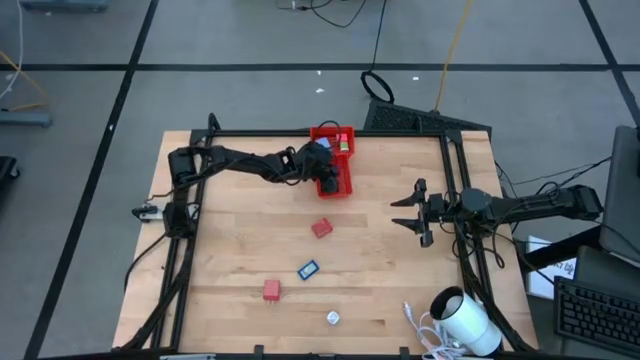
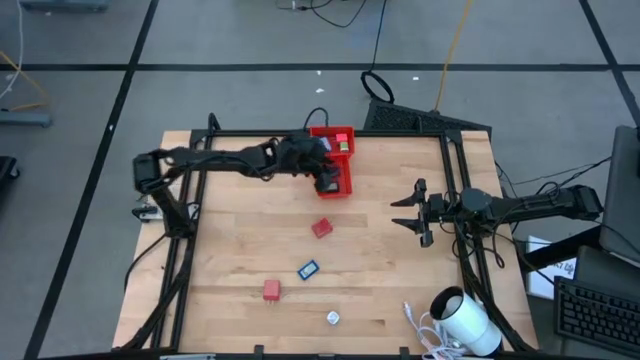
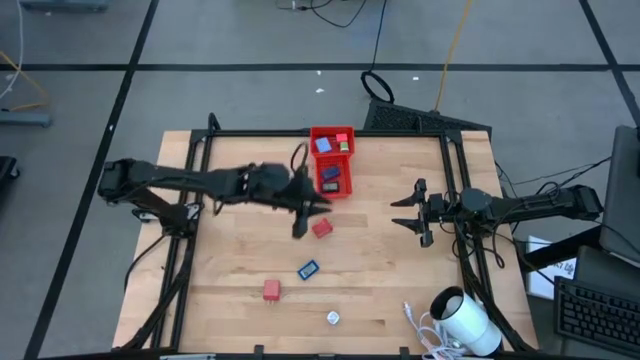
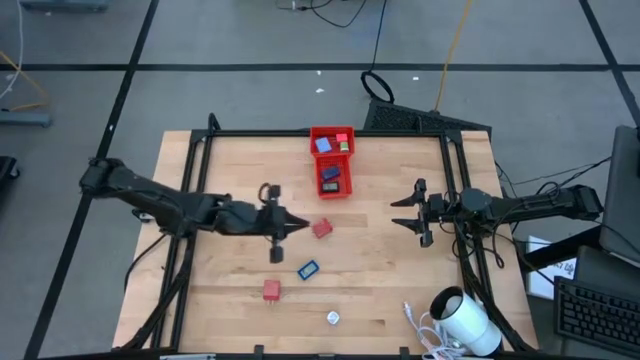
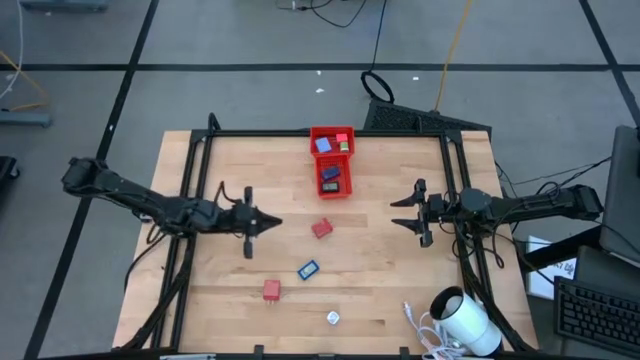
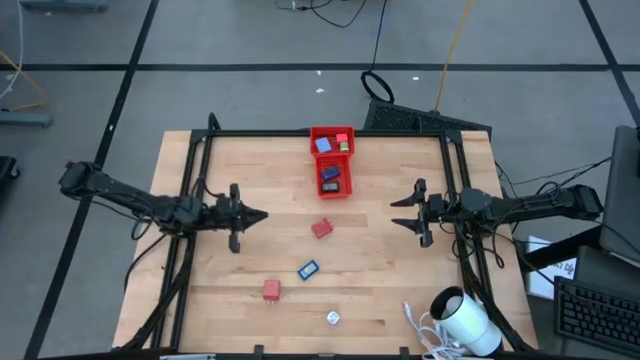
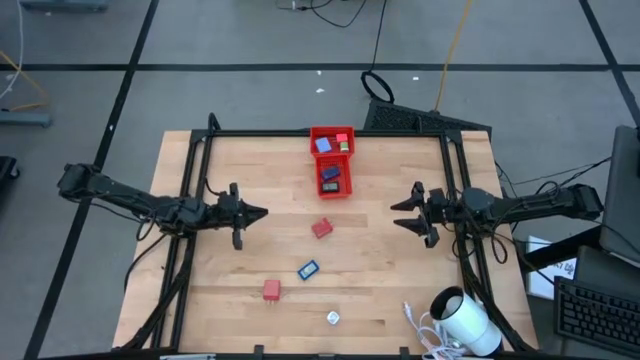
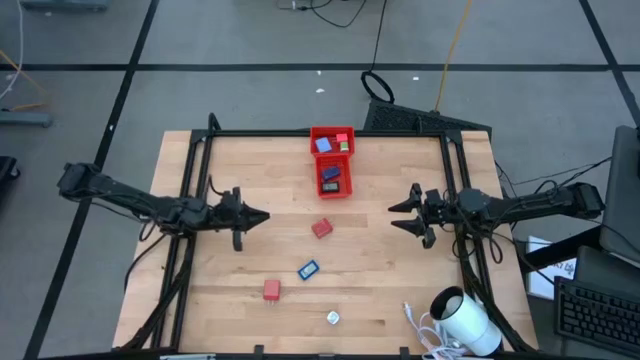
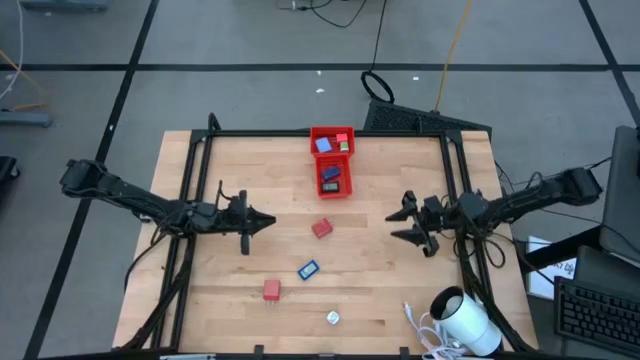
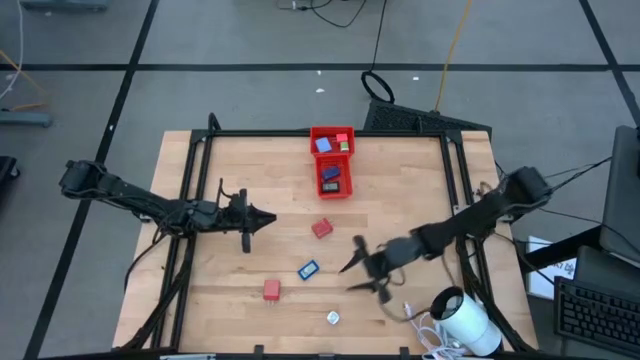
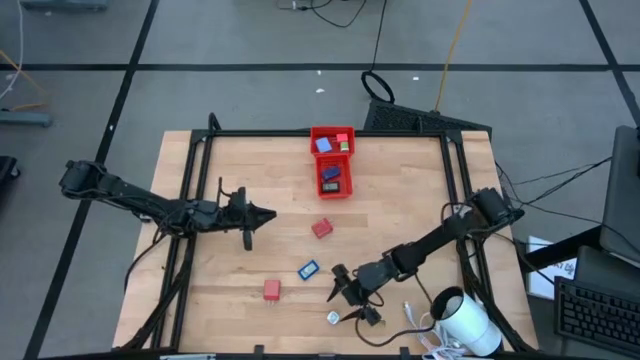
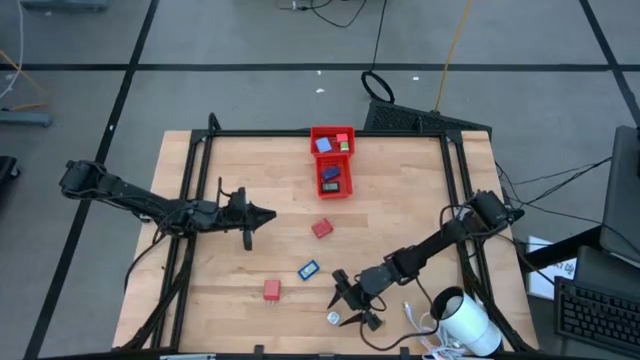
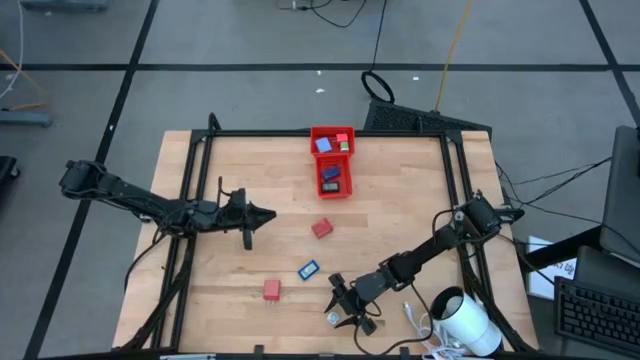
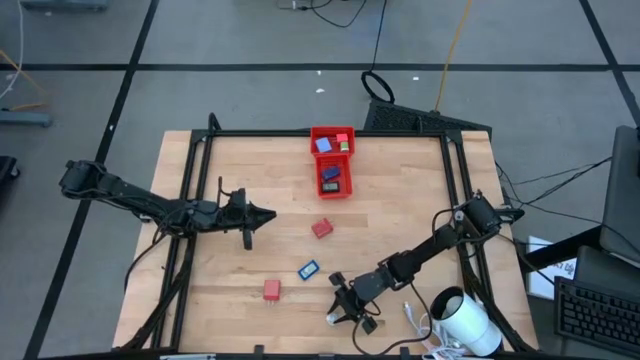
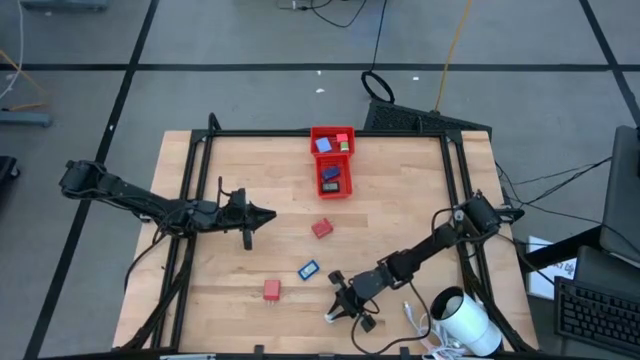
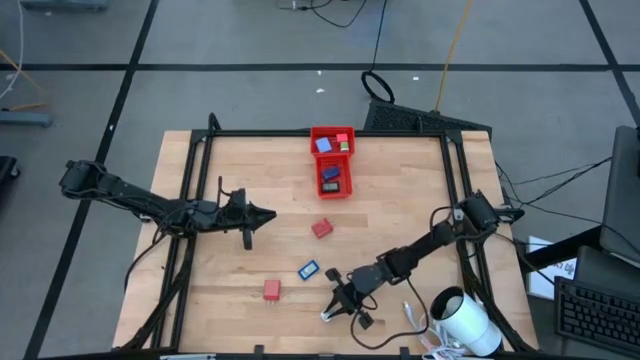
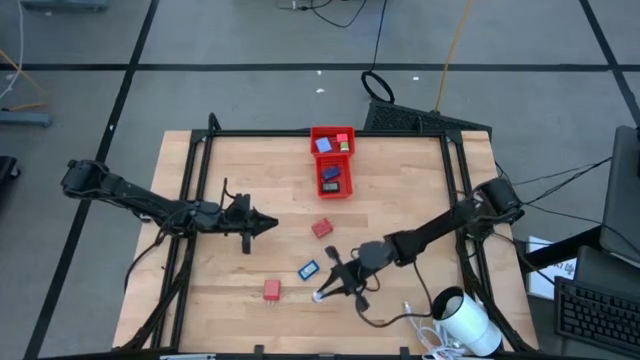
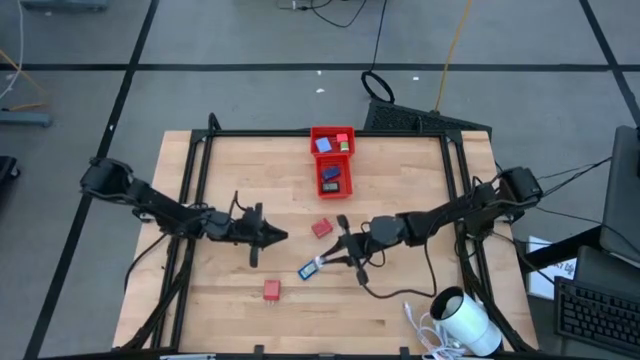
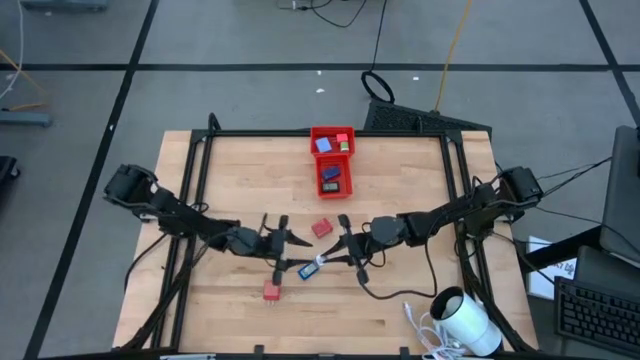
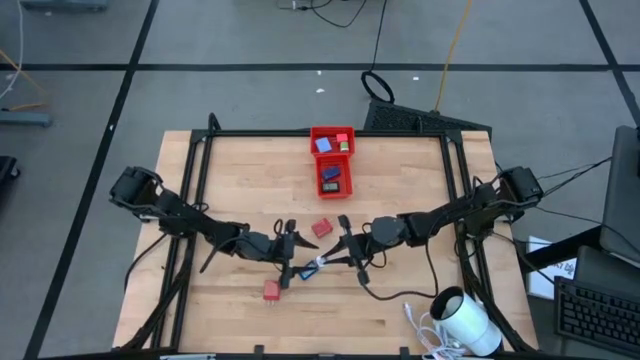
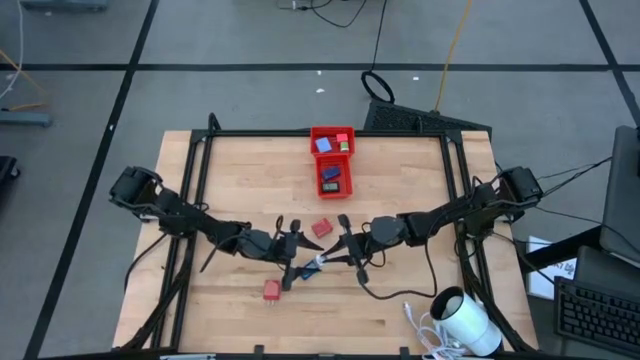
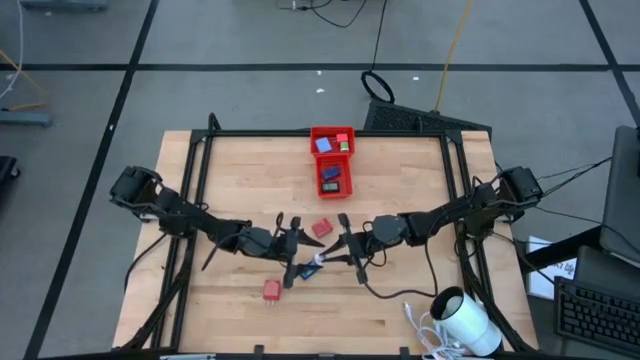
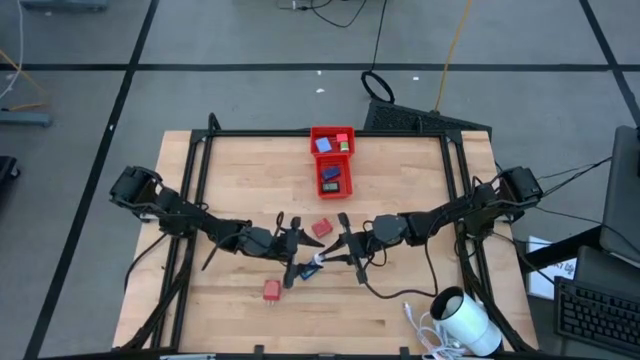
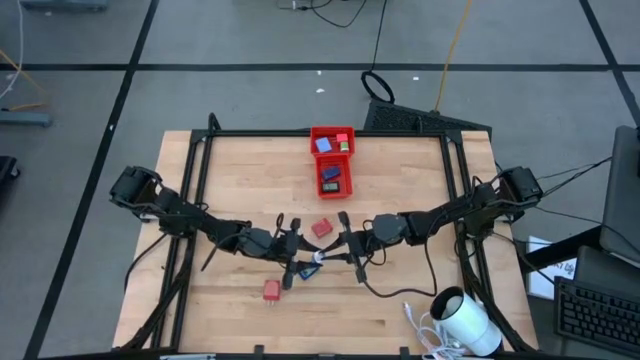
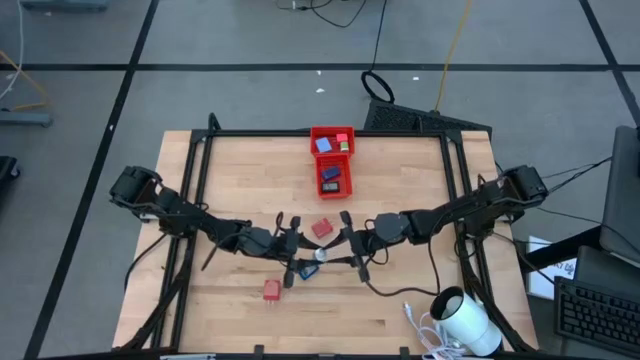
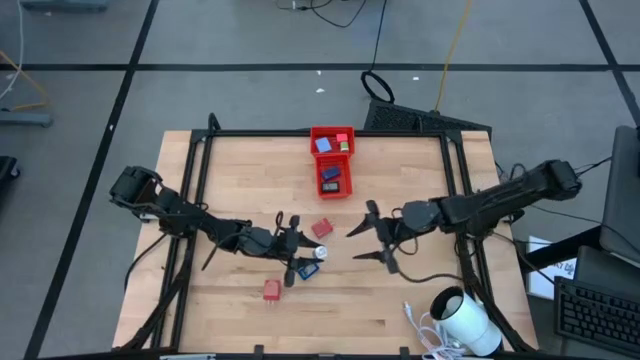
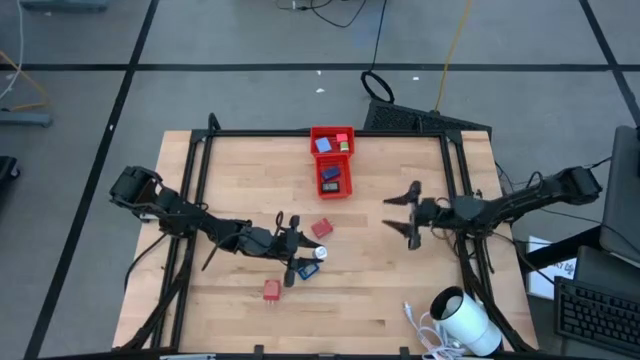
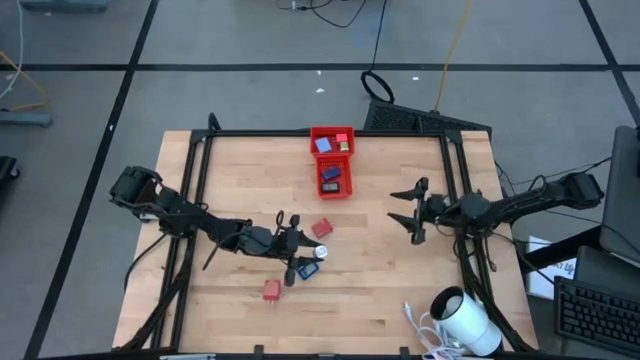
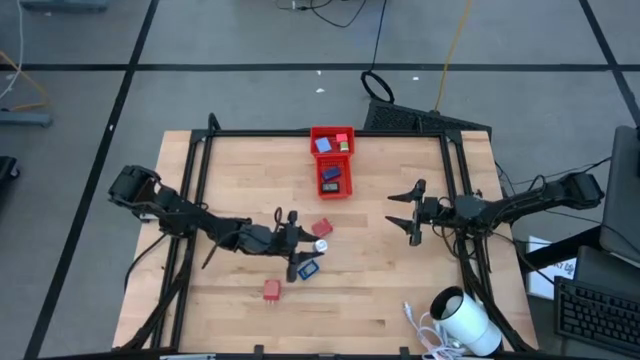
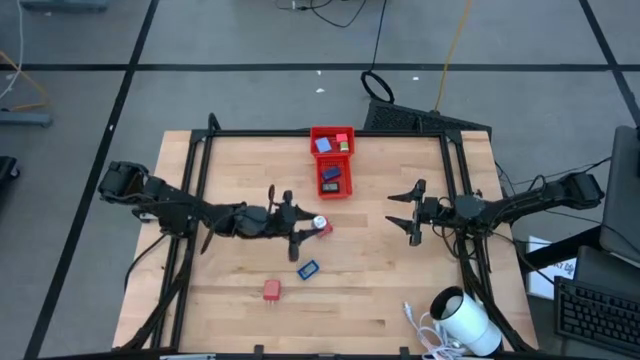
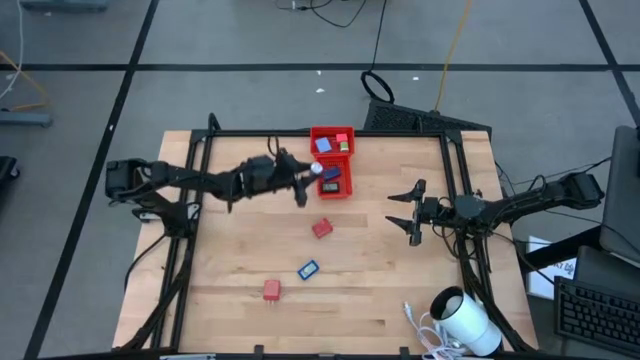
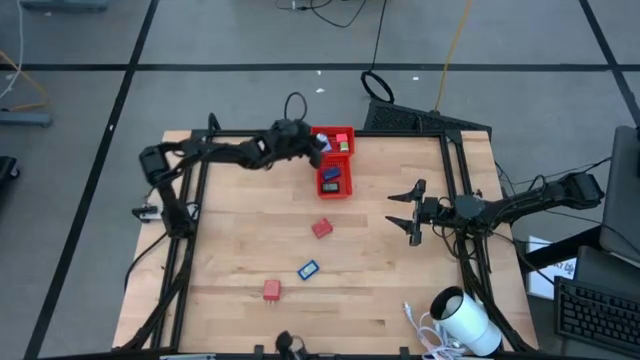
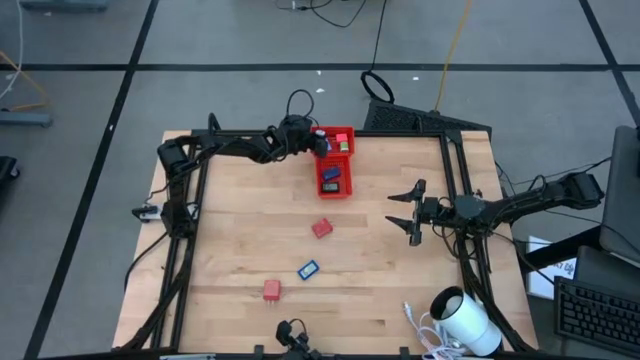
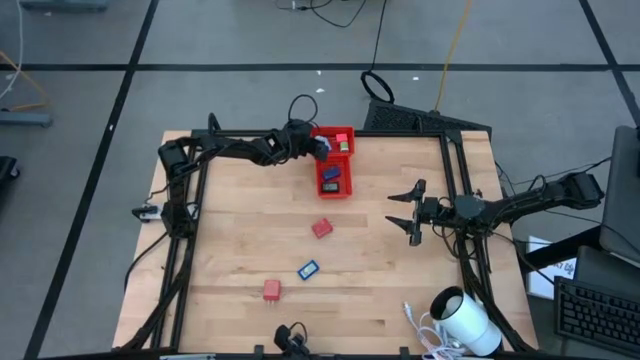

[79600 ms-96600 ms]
Task: Pick & Place Office items
Put the purple charger adapter into the top red bin

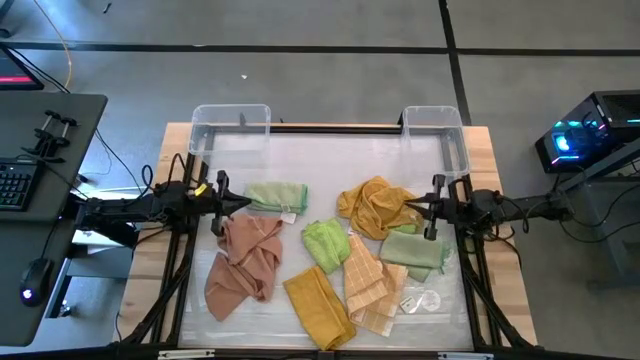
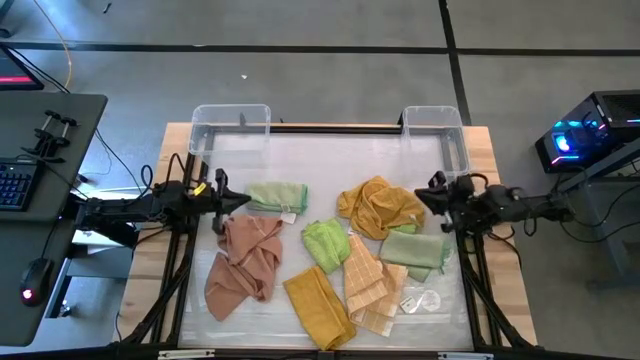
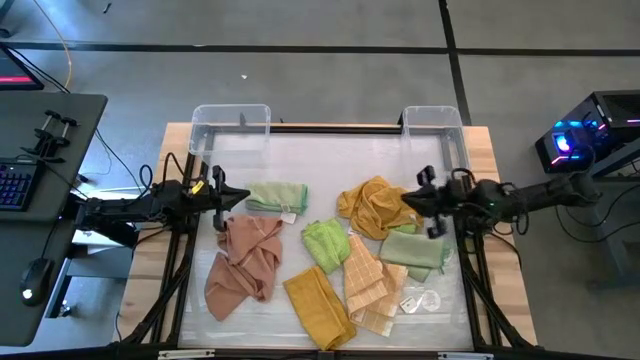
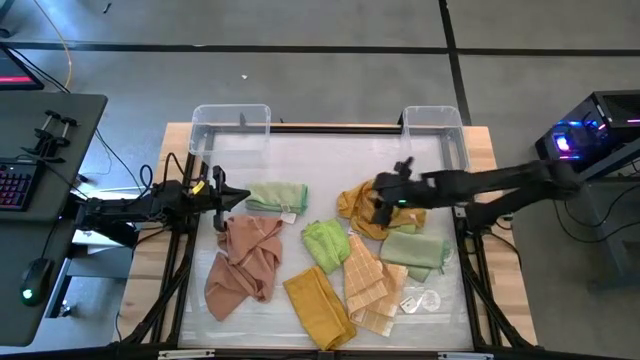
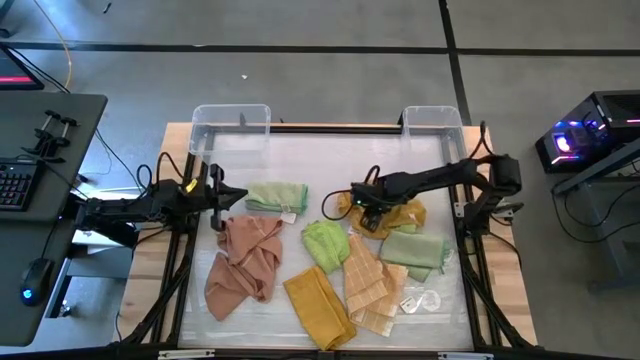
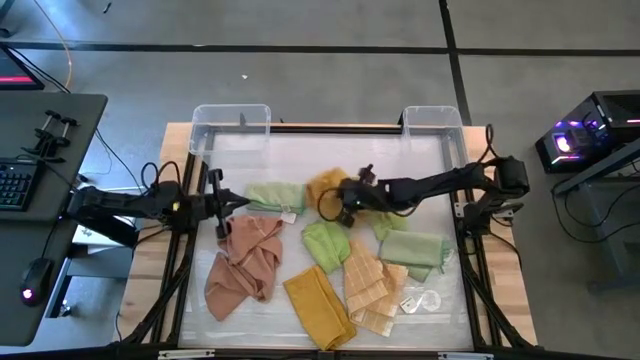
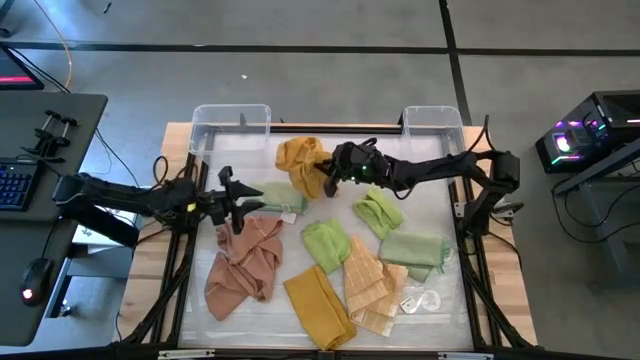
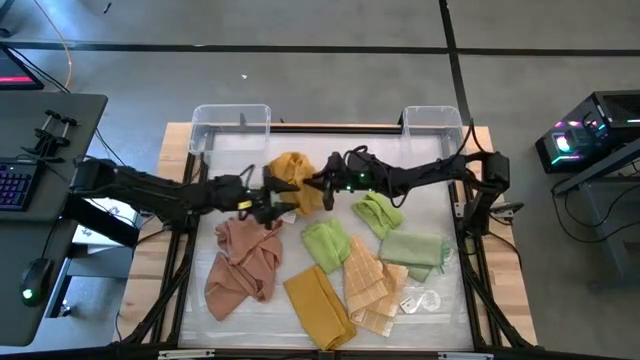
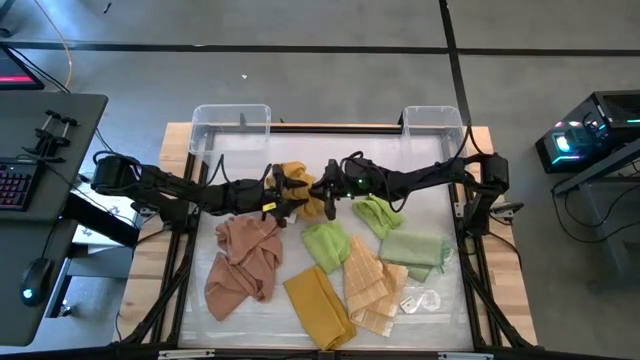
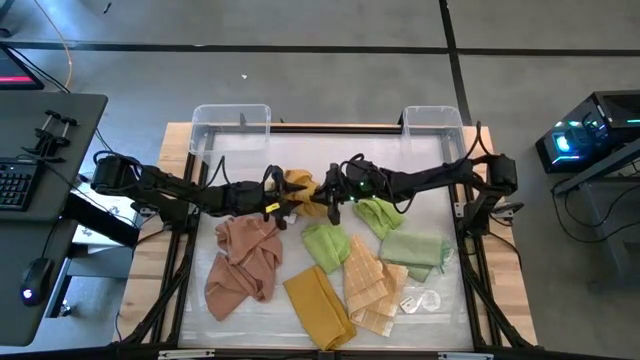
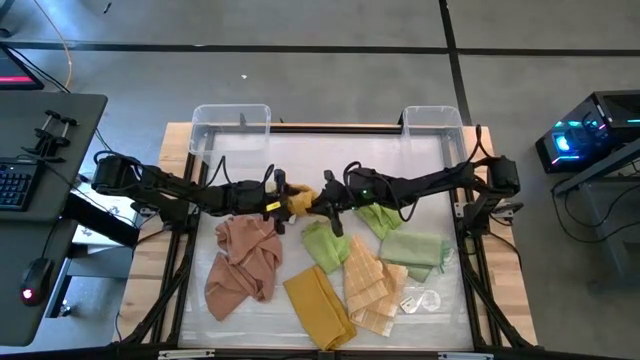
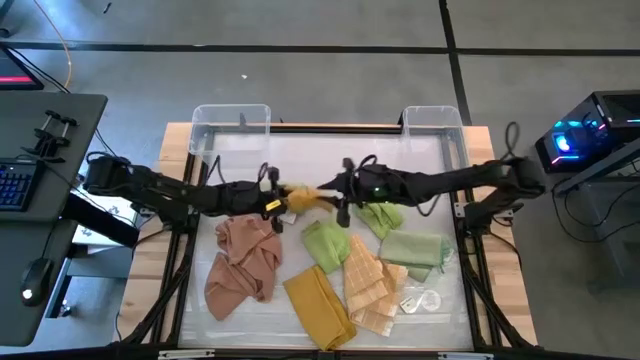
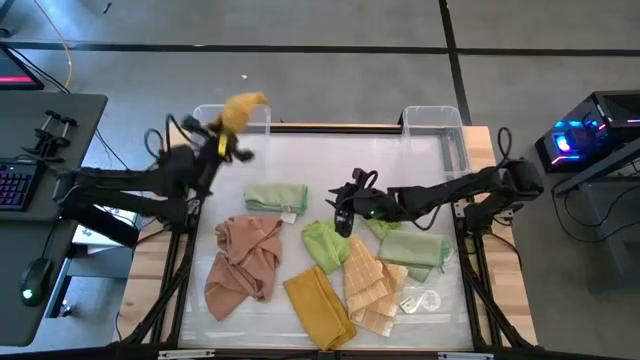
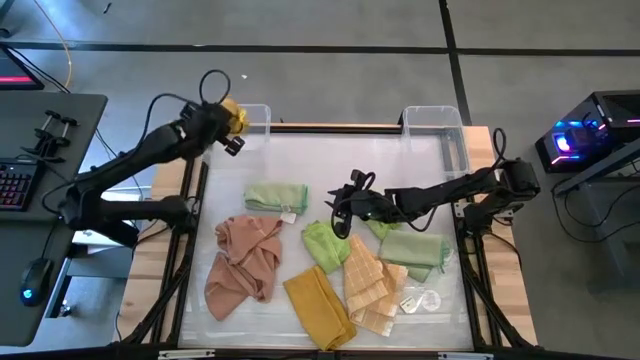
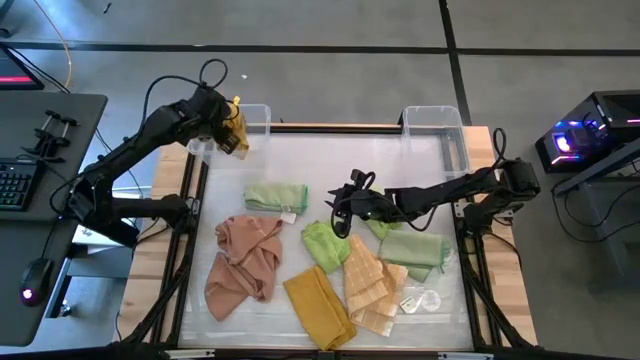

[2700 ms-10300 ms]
Task: Sort towels by color in basket
Put the top dark yellow microfiber cloth into the left transparent bin
